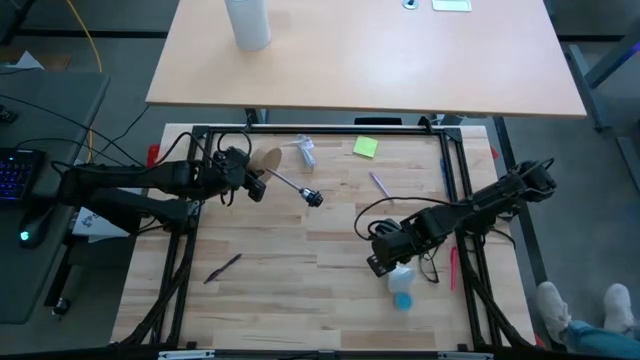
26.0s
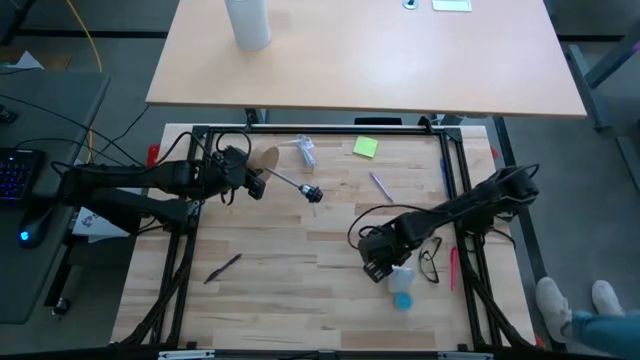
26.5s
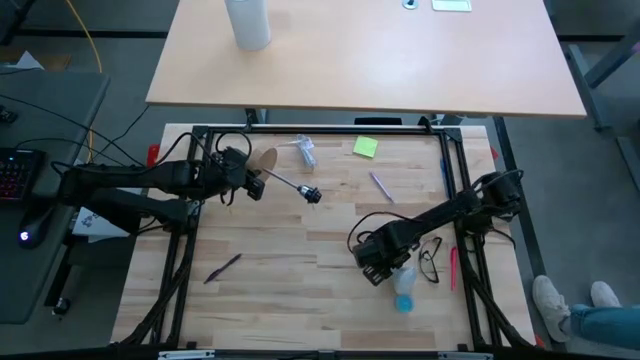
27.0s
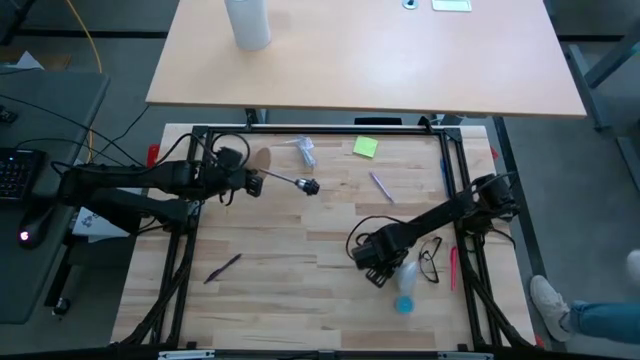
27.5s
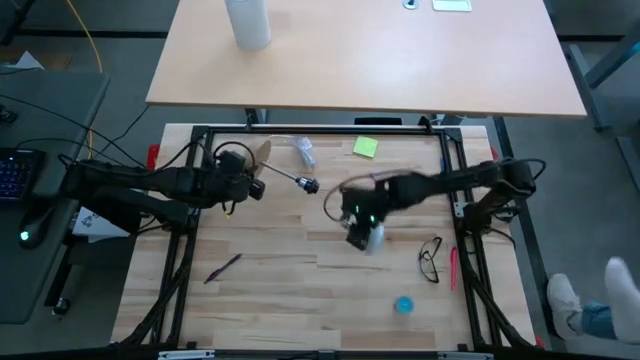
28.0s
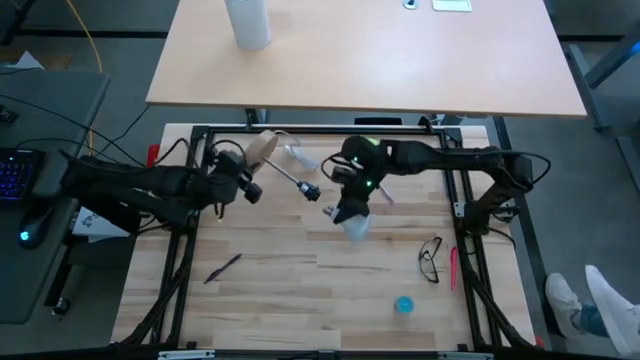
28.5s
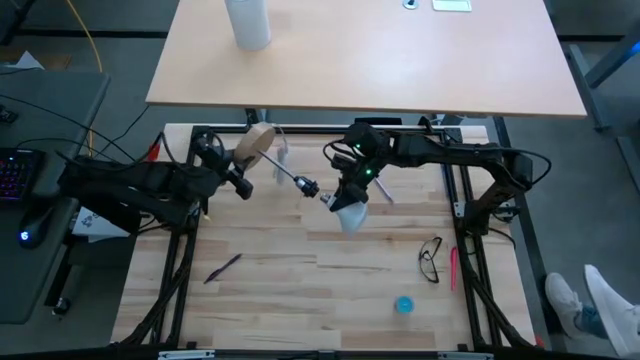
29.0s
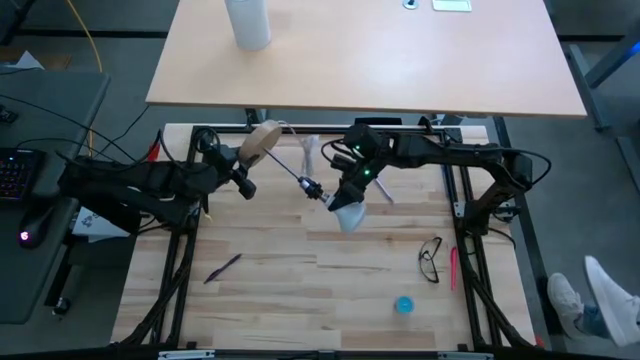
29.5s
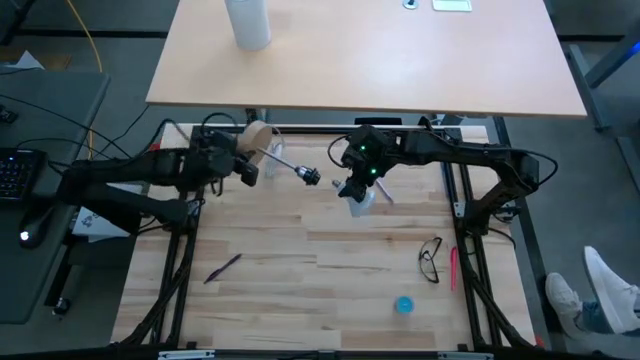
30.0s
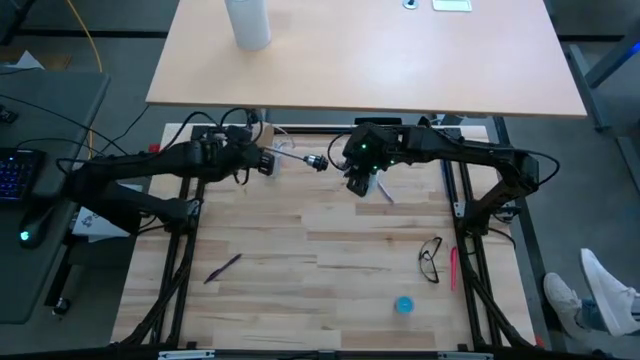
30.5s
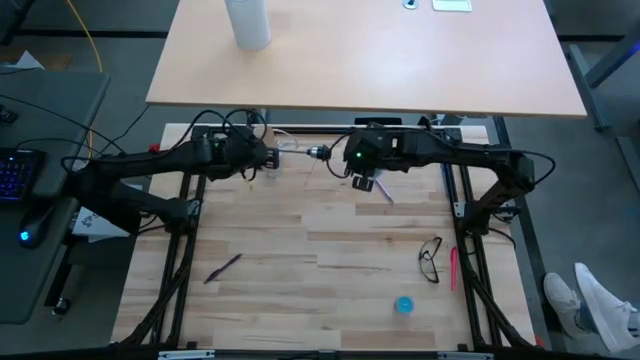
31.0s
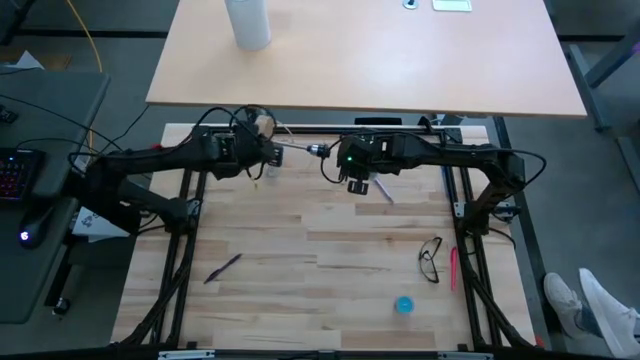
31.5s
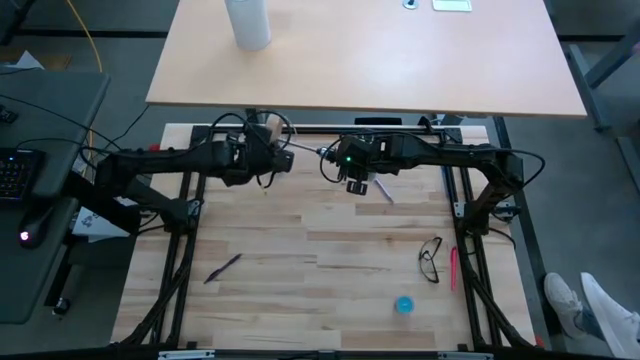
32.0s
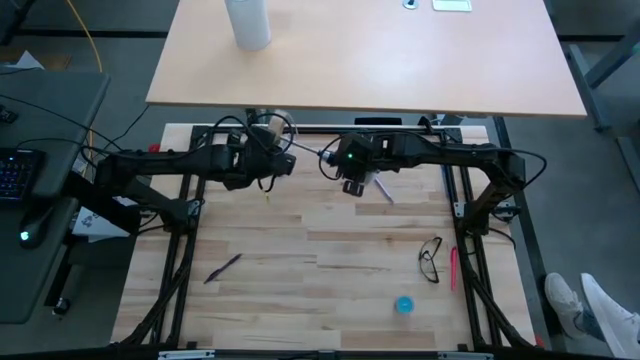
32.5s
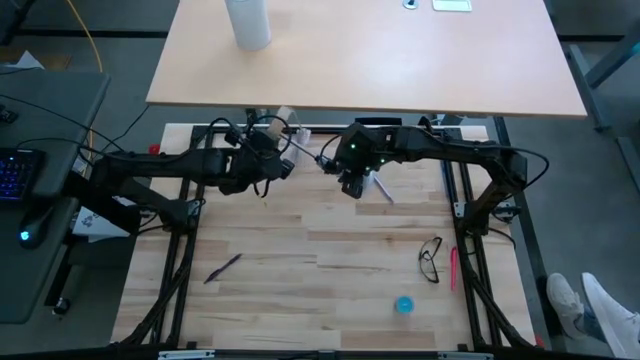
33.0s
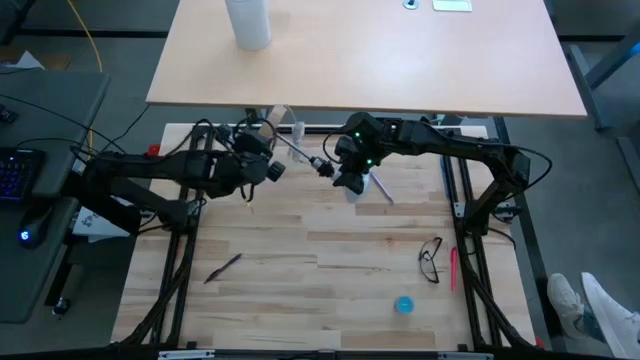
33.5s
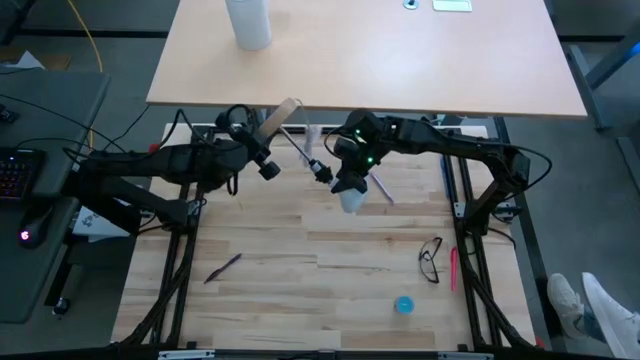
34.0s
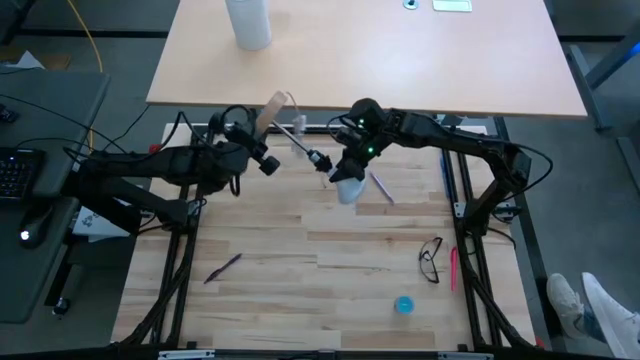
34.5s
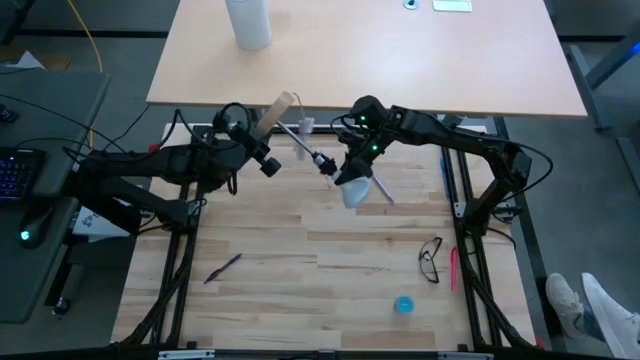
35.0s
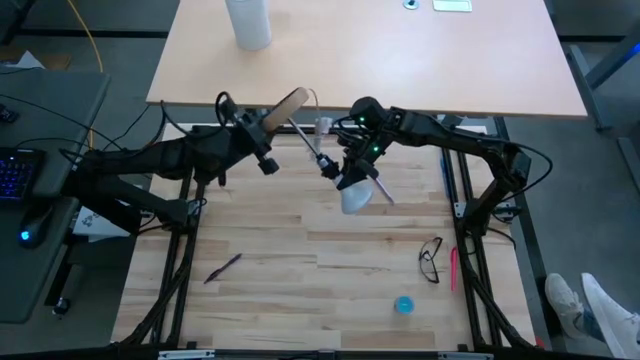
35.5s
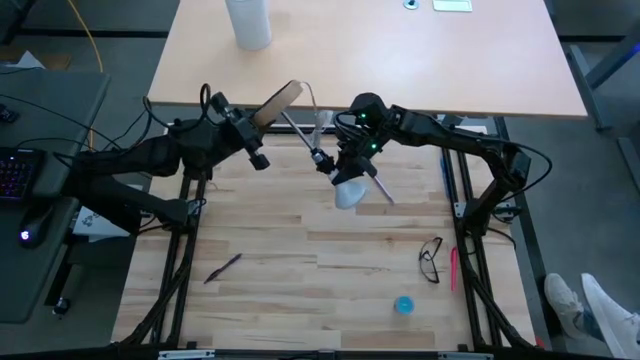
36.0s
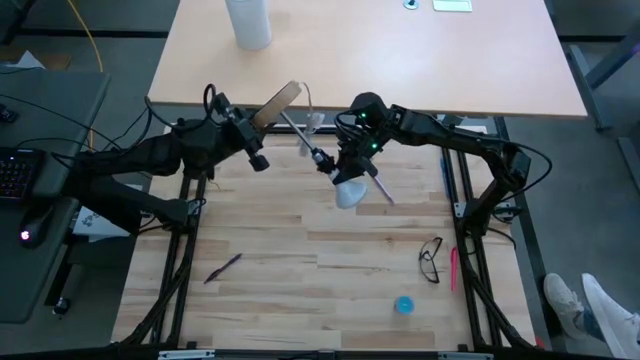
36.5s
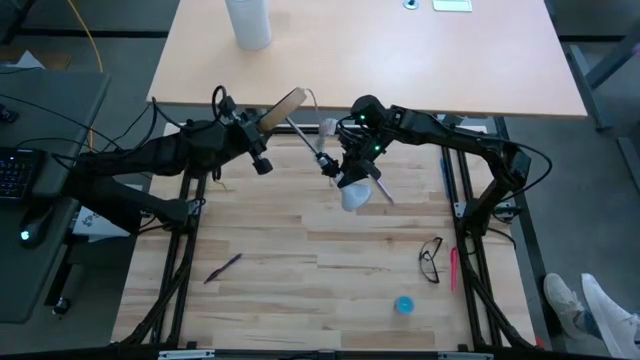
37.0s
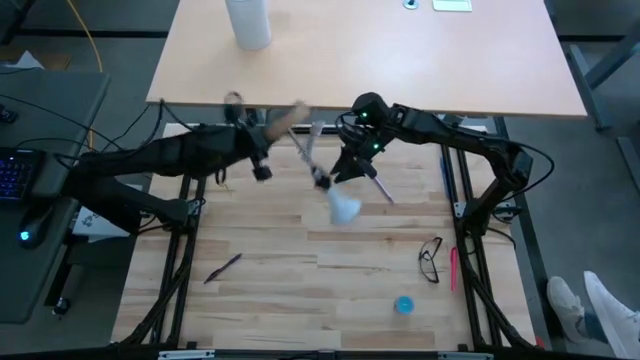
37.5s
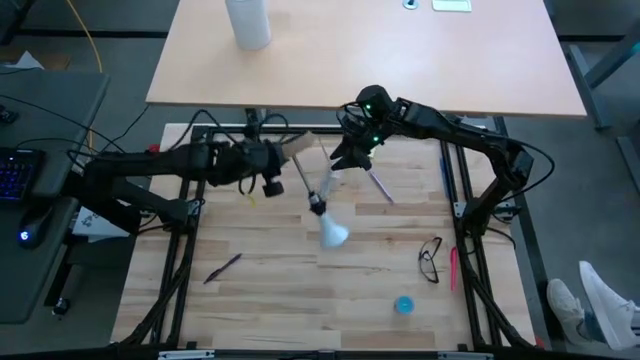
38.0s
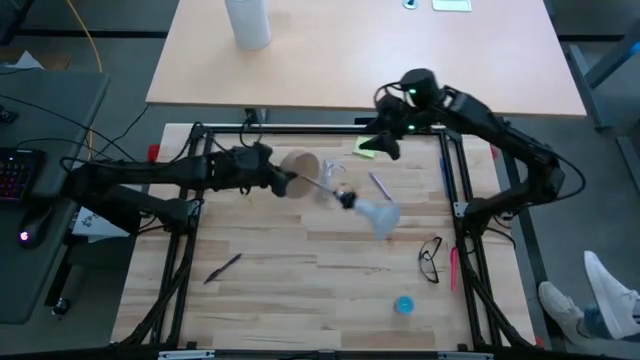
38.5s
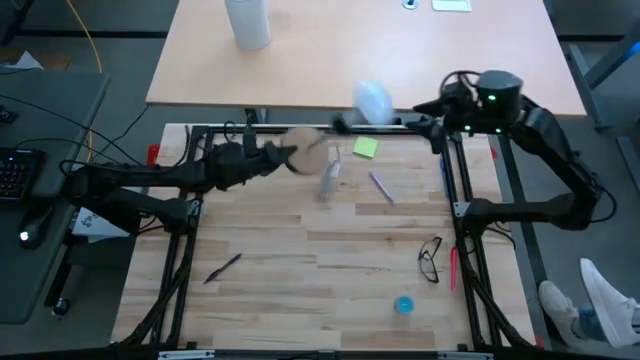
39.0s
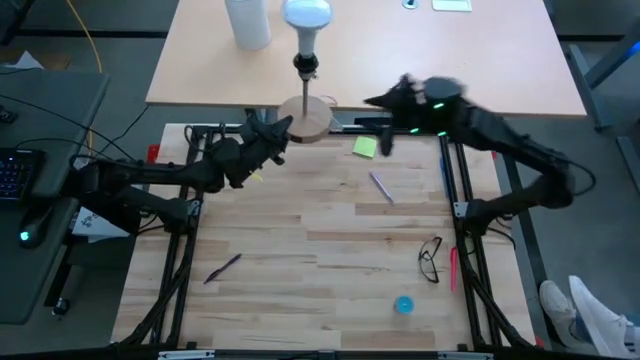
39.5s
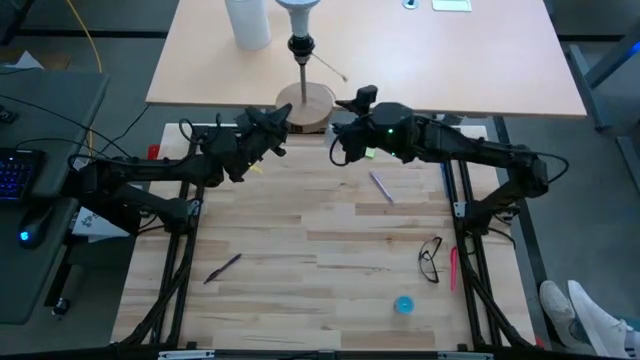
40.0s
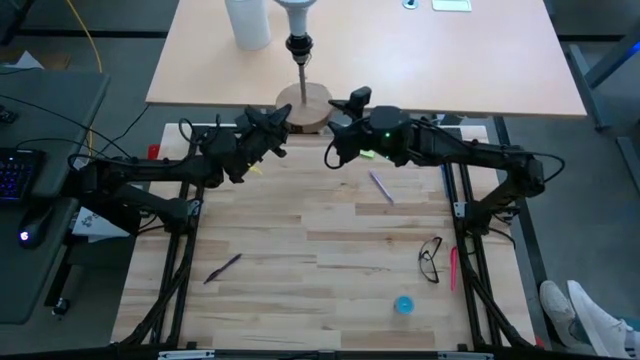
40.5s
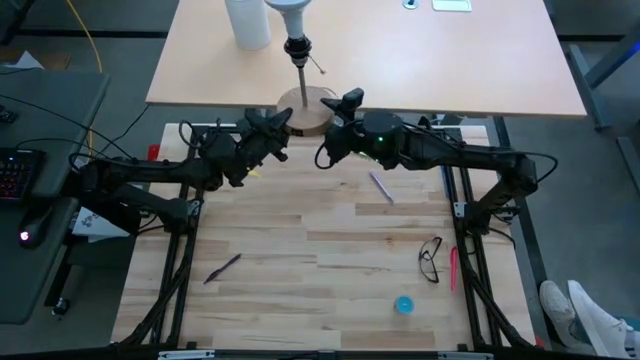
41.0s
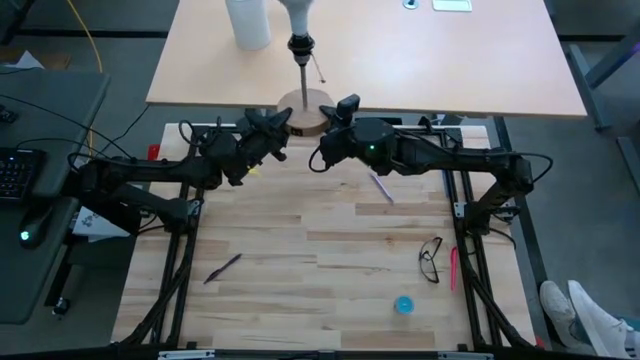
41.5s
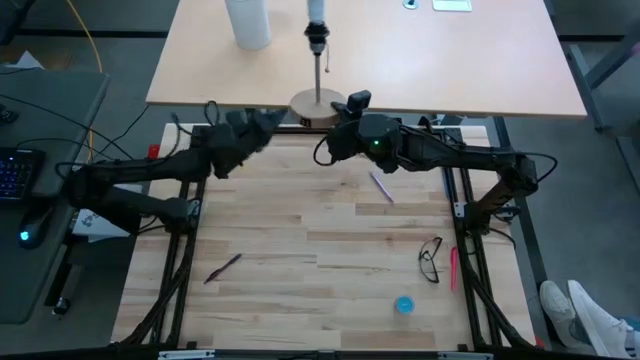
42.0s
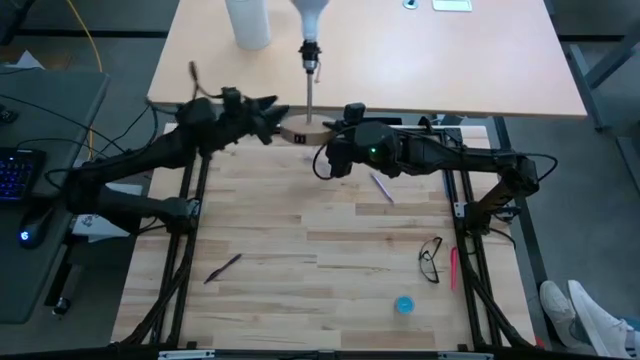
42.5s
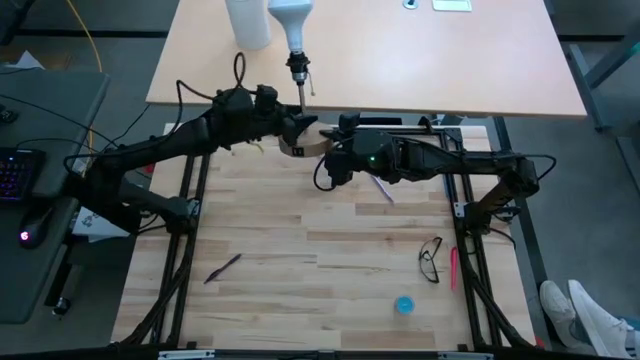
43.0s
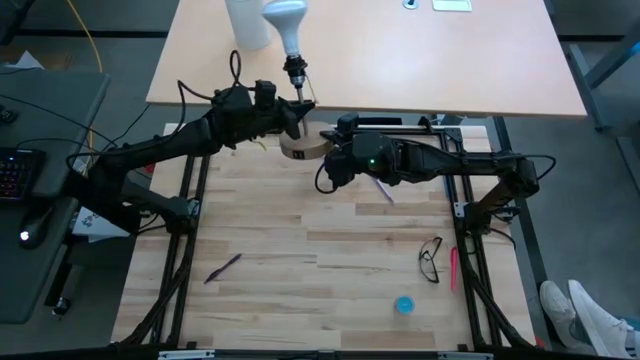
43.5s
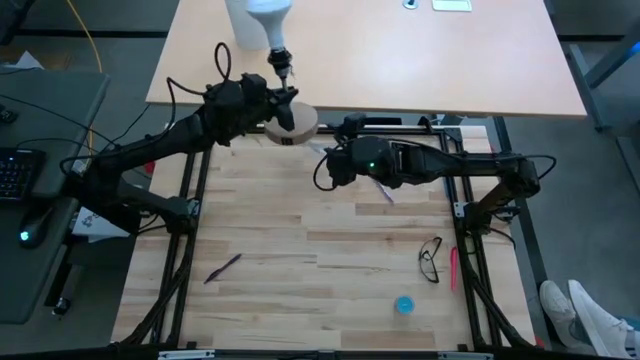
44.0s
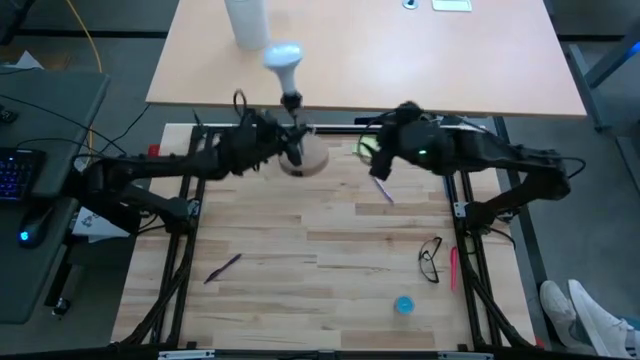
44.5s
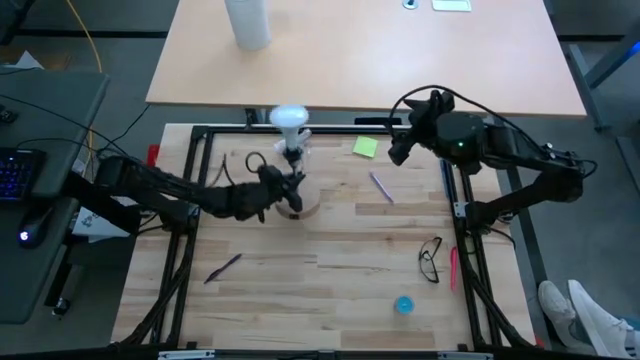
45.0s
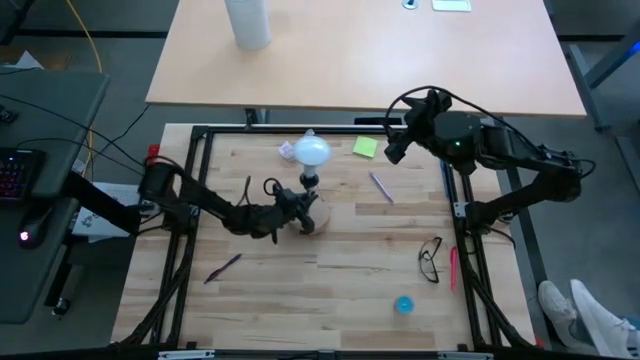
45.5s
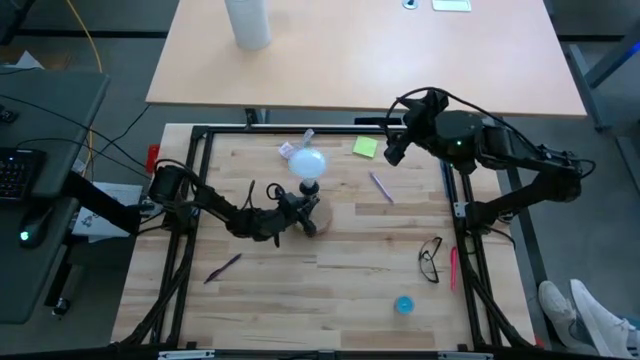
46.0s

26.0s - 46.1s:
Task: Screw lightbulb
Insert the light bulb into the lamp
